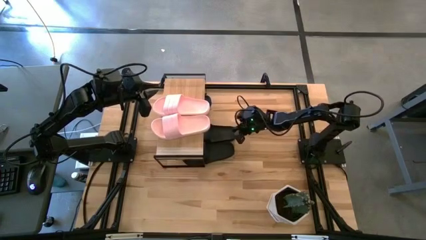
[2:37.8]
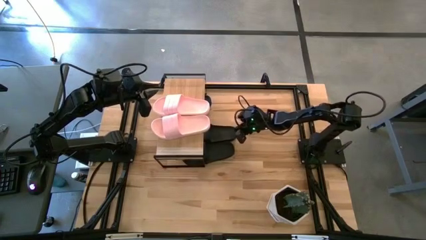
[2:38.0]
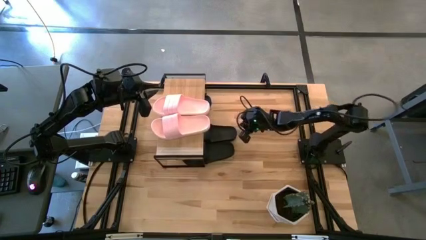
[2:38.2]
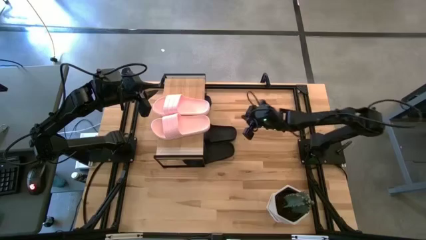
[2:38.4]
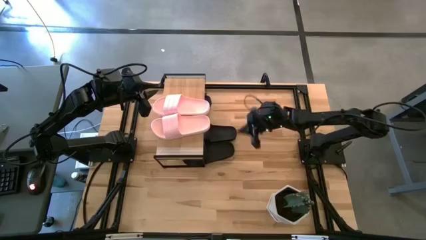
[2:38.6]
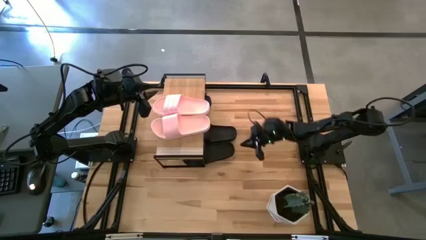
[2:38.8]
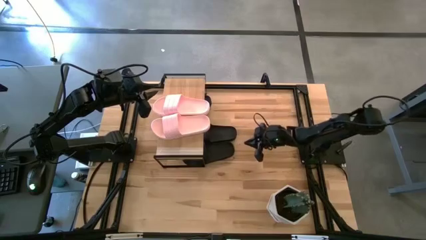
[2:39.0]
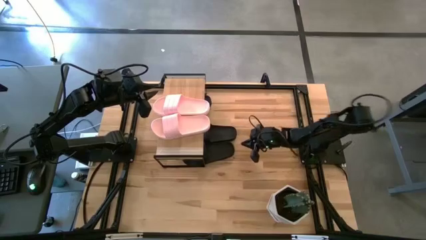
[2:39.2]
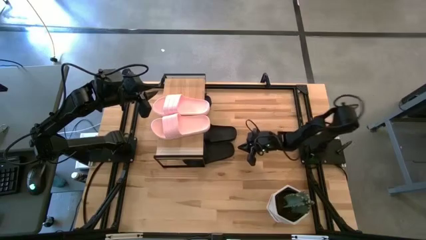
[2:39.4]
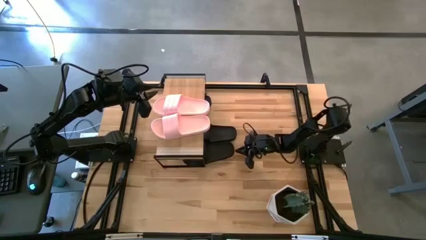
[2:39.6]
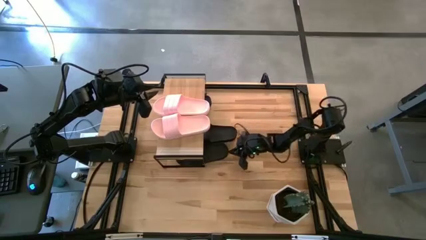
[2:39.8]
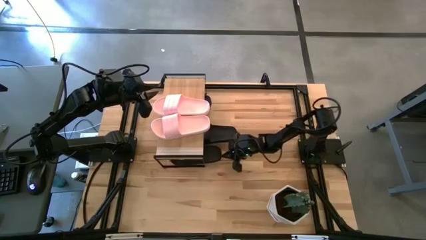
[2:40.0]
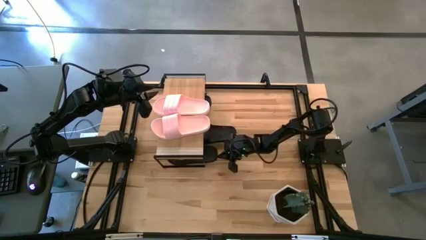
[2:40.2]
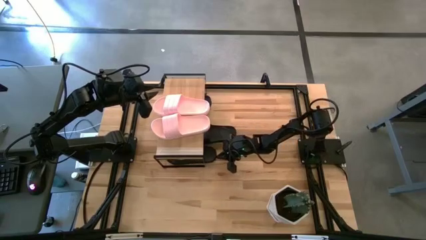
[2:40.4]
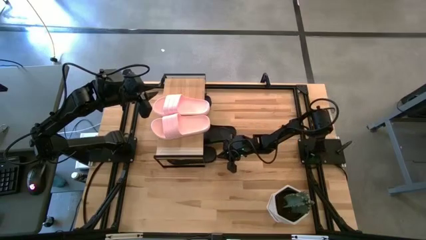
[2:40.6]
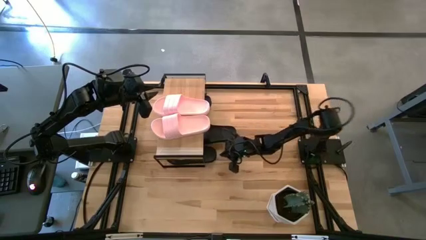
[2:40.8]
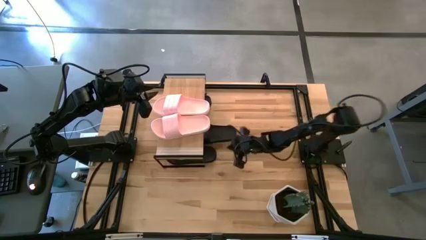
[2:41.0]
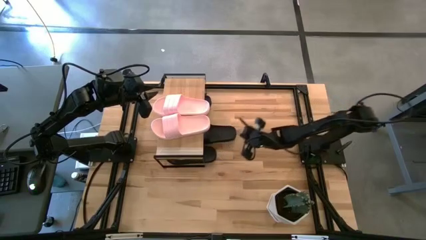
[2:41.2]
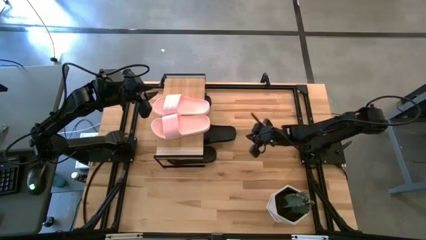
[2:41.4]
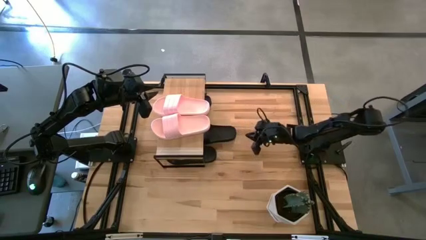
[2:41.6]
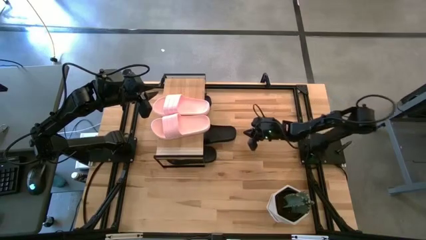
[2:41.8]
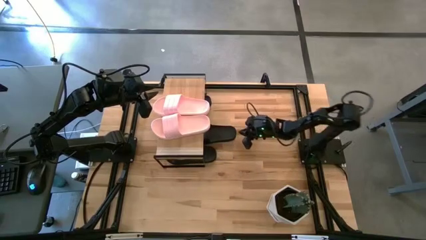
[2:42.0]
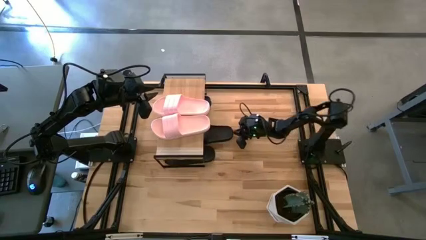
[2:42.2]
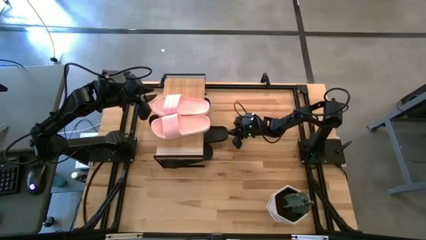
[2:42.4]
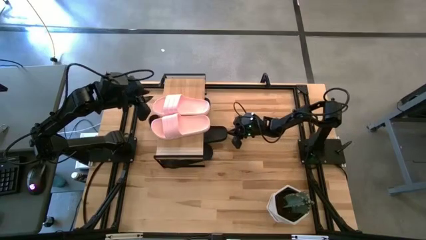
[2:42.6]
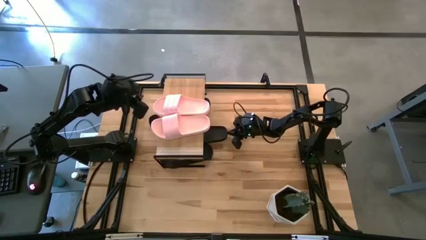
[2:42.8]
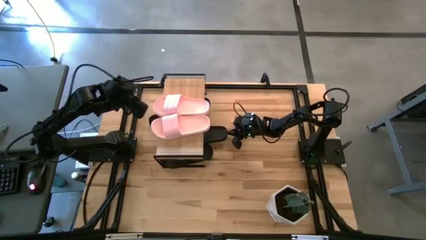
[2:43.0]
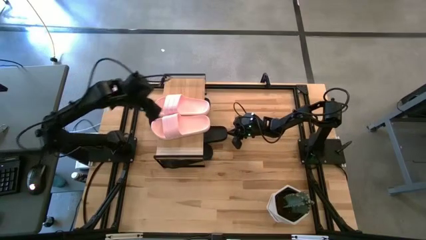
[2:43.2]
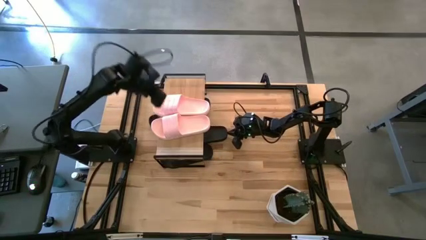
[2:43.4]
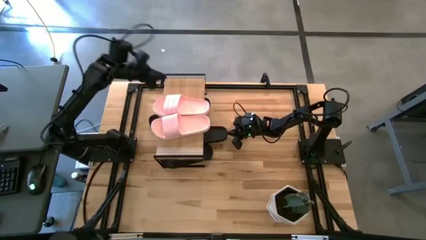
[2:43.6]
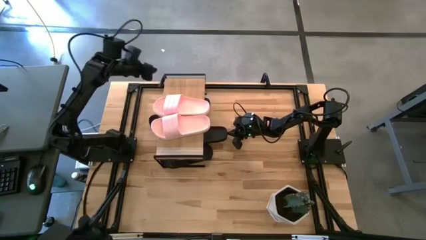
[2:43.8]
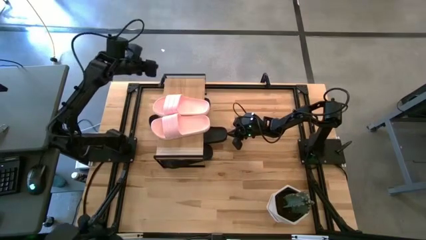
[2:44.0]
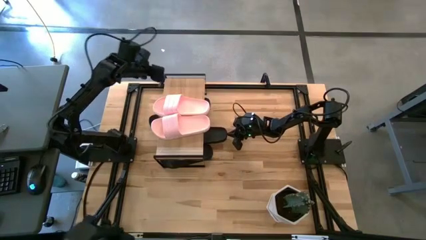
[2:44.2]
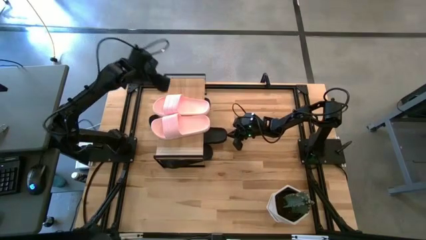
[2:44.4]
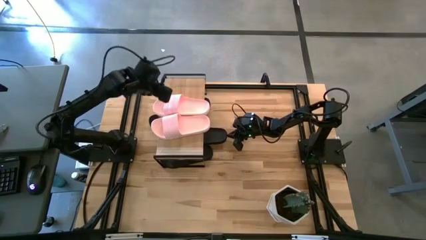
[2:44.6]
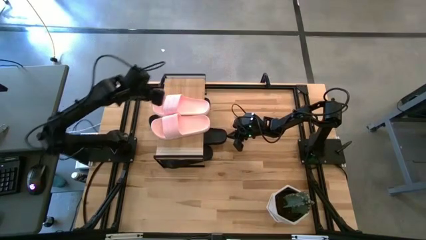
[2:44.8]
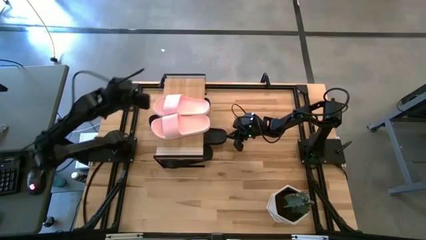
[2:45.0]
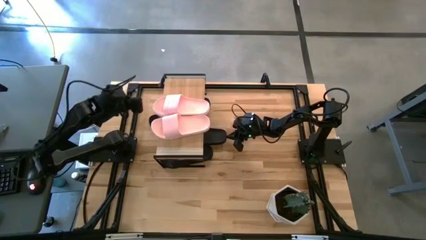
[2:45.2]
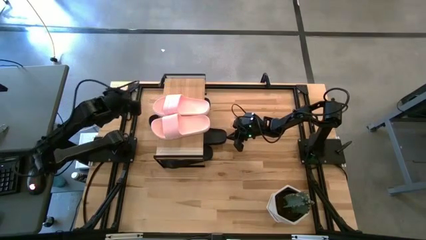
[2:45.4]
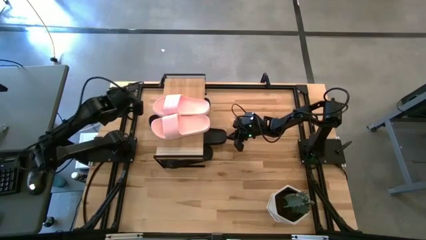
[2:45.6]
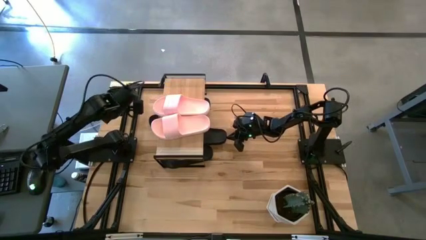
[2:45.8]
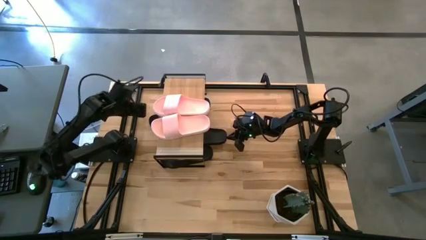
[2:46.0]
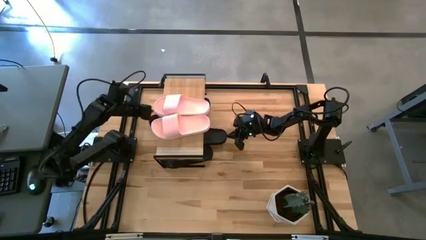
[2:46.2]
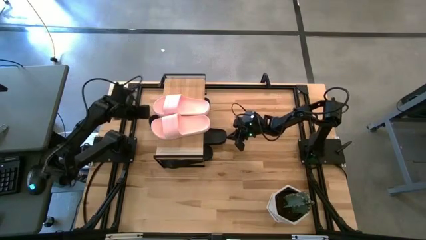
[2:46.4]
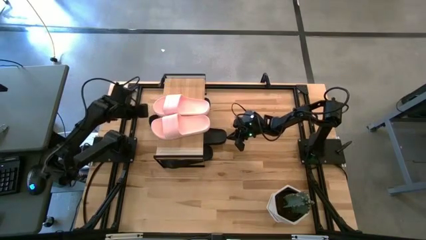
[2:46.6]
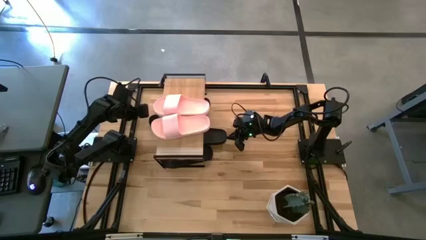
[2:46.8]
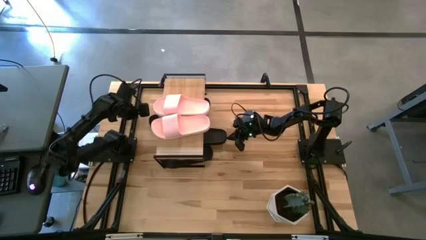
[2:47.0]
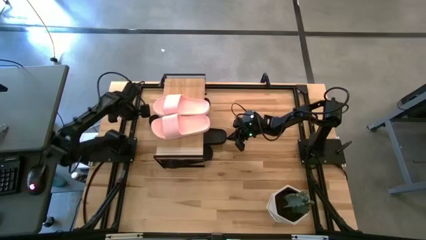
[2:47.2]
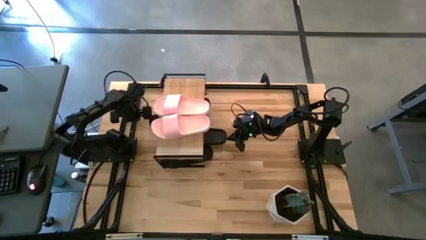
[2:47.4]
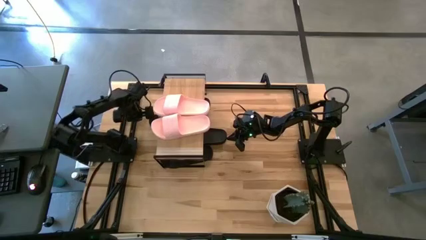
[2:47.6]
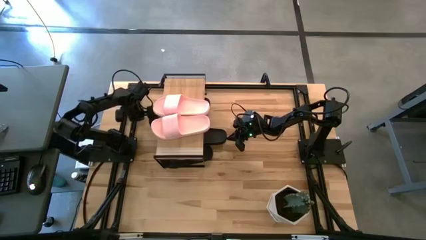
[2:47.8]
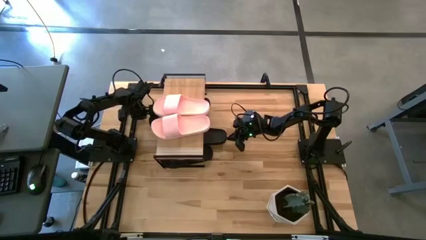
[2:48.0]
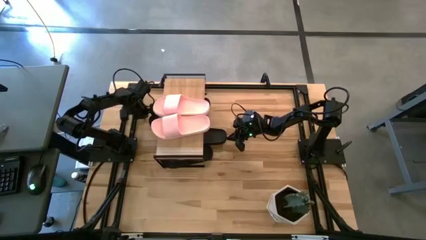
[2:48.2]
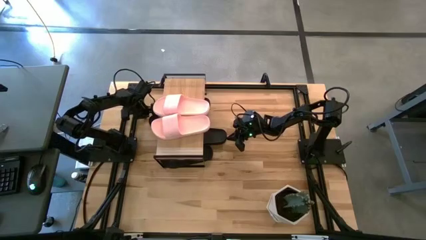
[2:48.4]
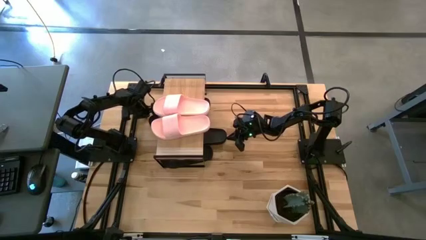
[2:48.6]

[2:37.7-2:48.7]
Task: Pick and place slides into the shelf
Adjust the black slides under the shelf
